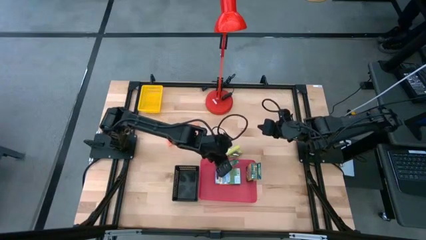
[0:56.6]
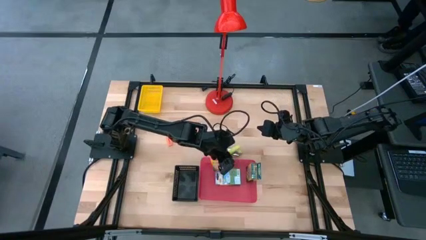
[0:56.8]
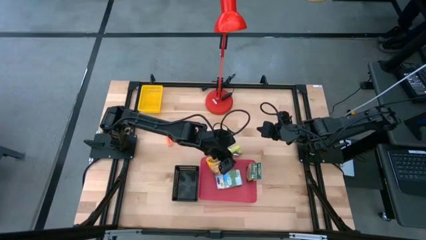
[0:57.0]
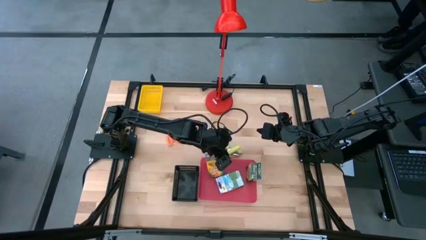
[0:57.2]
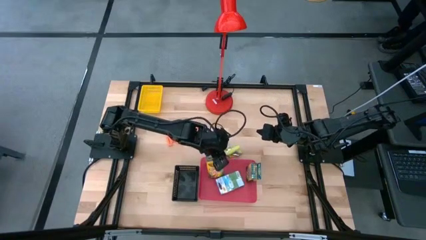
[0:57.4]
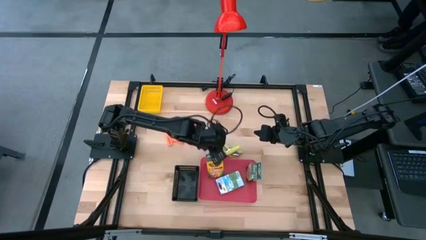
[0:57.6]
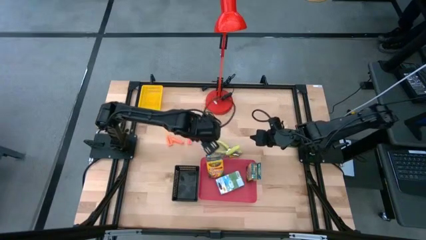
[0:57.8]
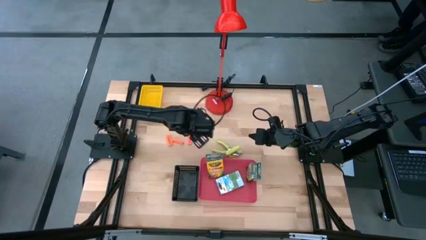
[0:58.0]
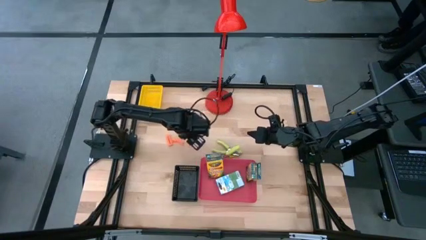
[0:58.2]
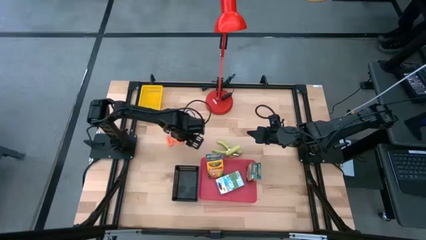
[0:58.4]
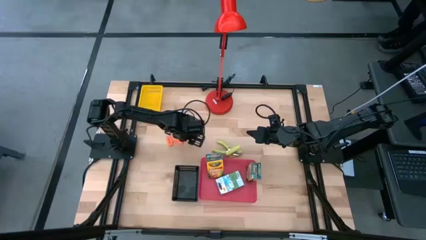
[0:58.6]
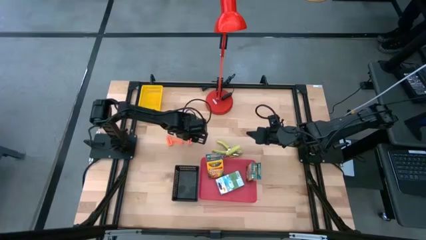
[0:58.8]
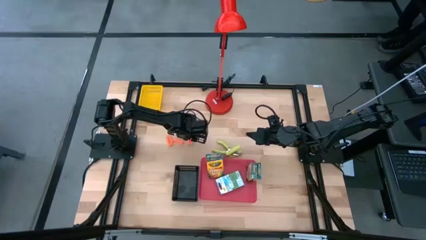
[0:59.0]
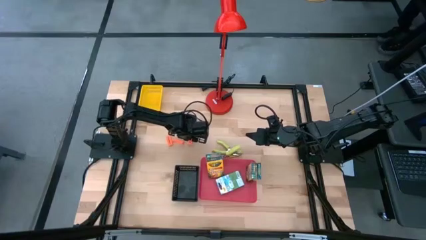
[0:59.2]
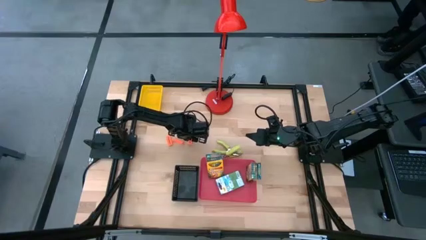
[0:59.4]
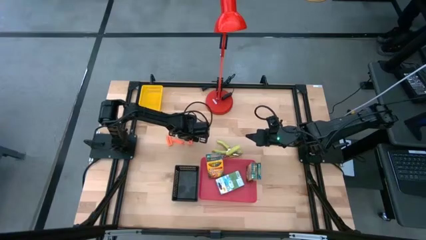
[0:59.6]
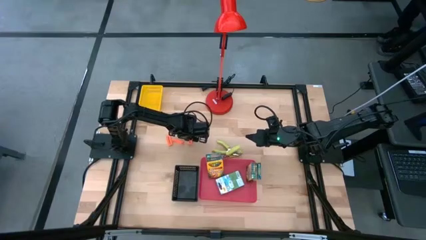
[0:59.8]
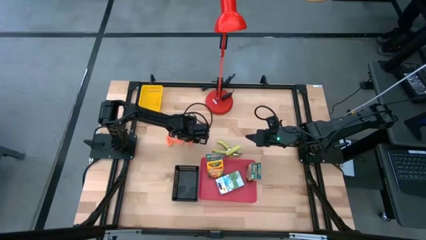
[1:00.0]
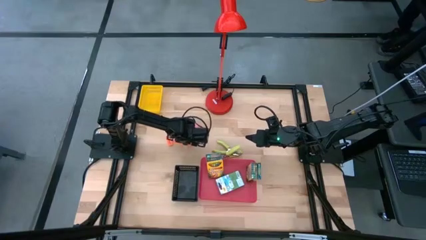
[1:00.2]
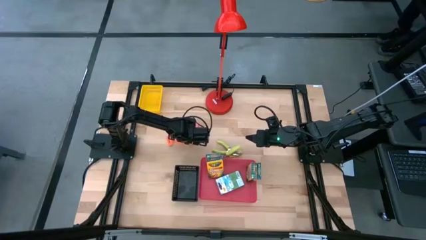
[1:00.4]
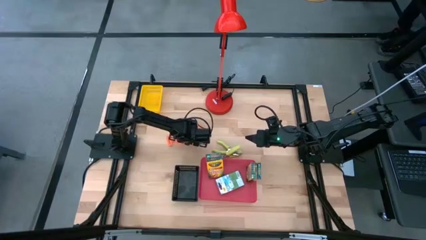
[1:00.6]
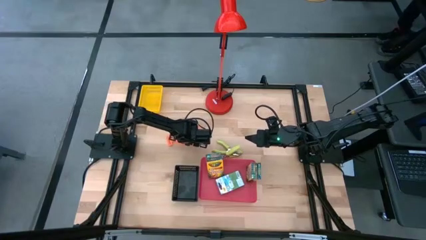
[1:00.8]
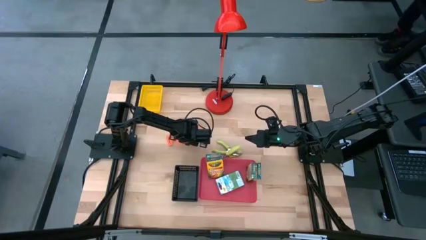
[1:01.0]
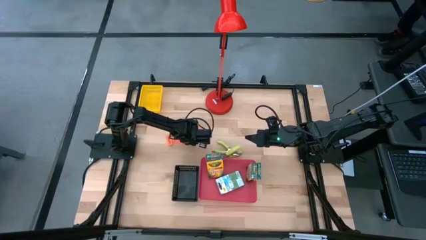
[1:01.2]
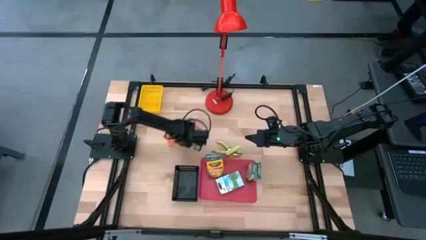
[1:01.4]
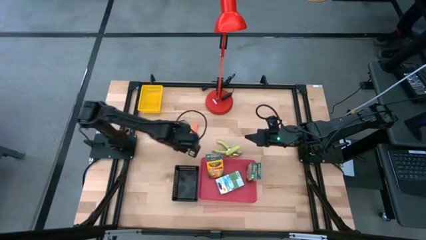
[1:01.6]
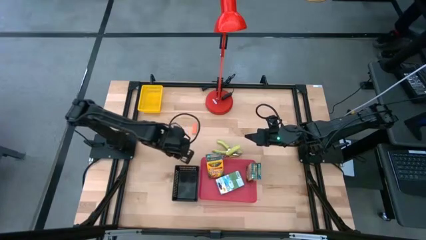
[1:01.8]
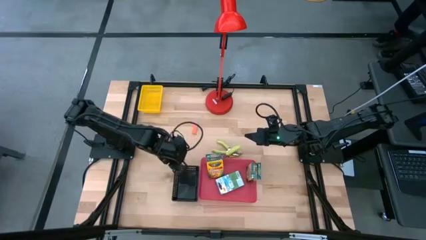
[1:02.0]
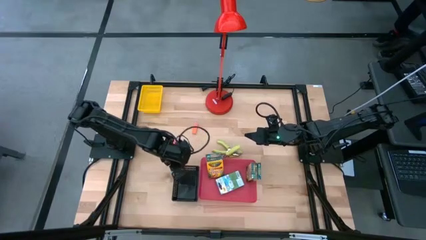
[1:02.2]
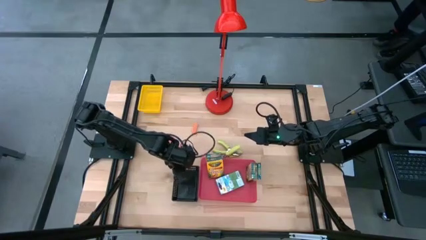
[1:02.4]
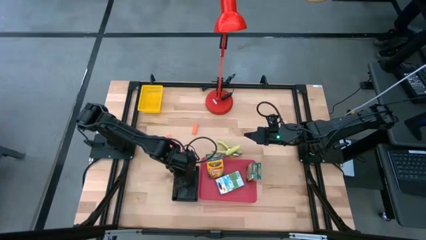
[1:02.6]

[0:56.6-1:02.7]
Task: Pick & Place School Supplies
Put the orange eraser into the black bin

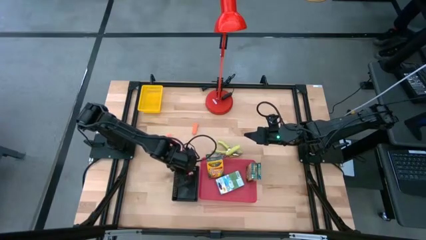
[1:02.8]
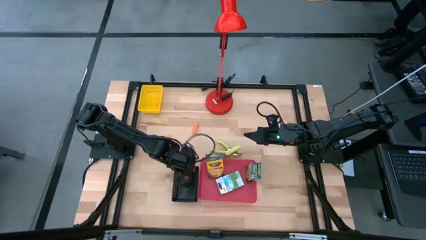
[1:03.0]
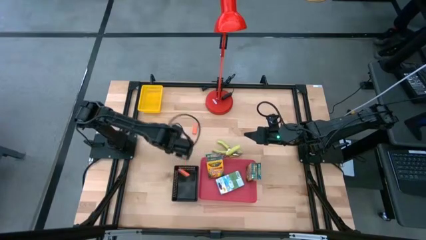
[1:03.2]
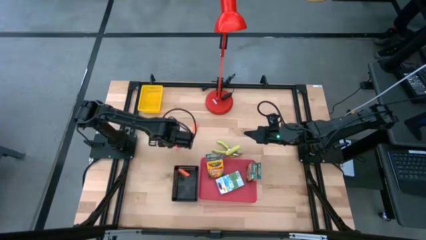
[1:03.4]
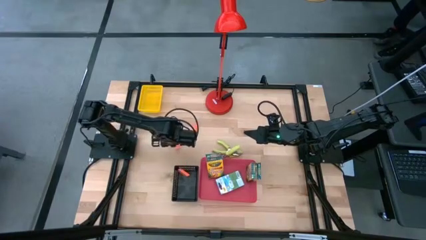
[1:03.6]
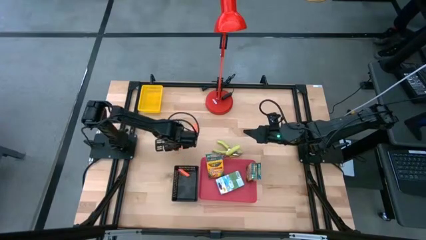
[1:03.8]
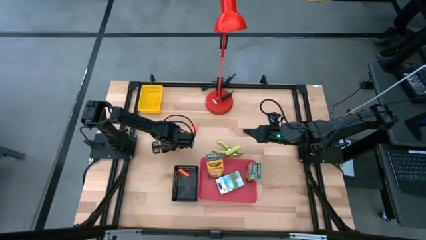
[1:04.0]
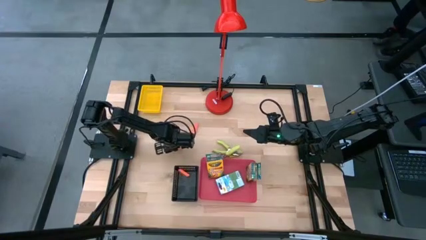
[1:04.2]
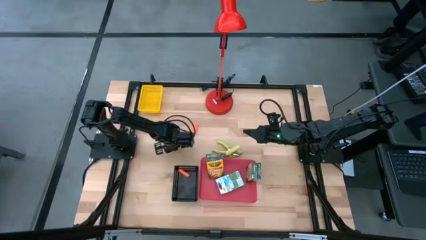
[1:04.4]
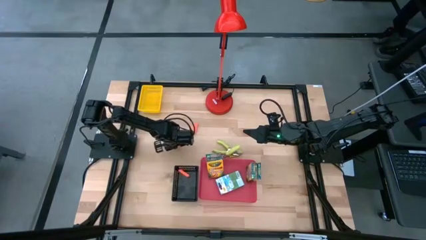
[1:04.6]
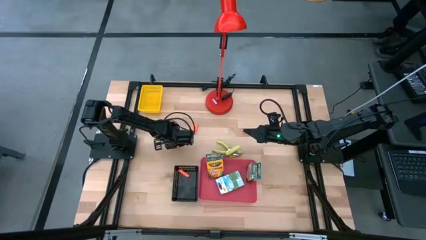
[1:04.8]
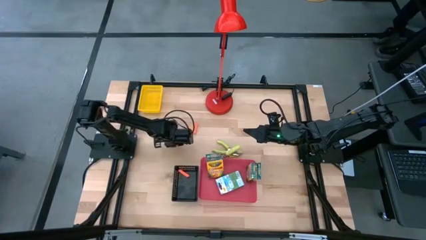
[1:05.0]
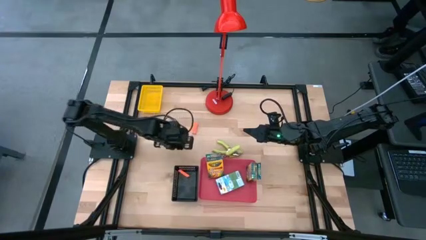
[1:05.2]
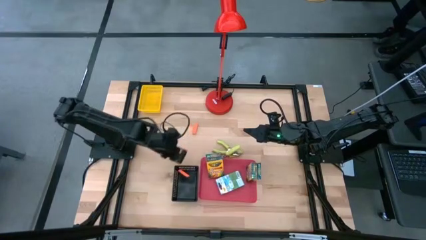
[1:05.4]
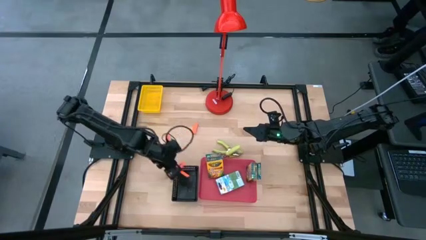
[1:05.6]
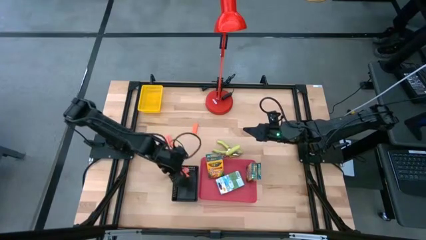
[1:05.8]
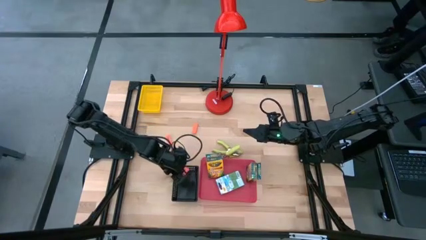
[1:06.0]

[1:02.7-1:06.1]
Put the orange eraser into the black bin

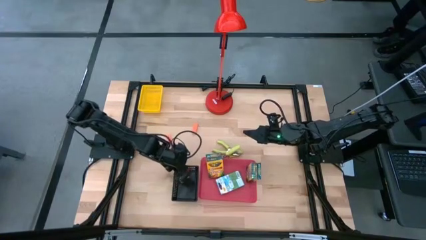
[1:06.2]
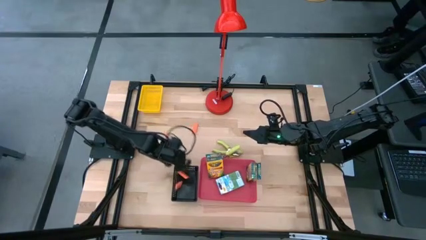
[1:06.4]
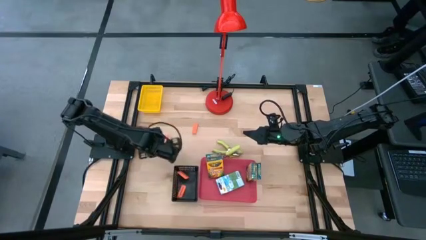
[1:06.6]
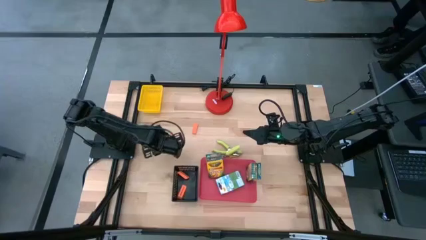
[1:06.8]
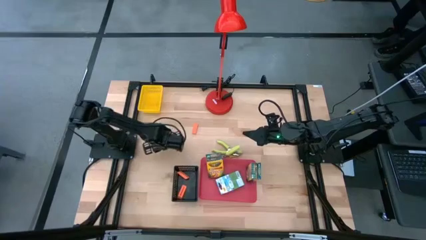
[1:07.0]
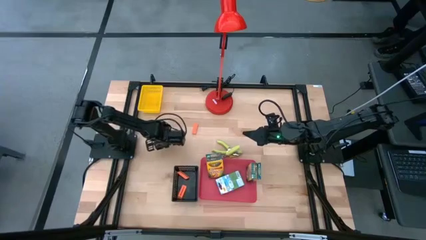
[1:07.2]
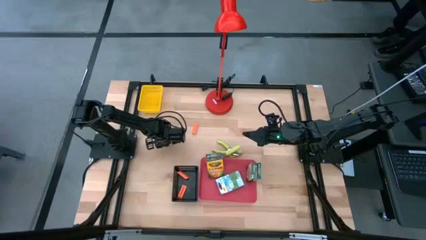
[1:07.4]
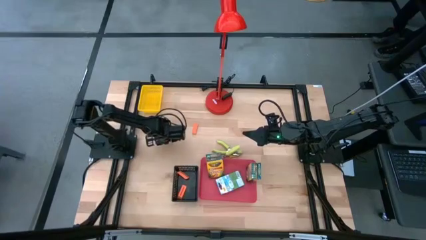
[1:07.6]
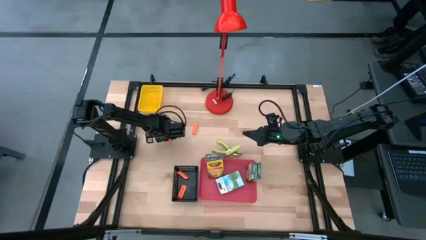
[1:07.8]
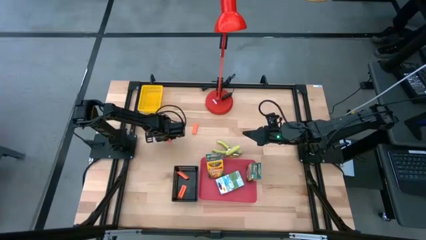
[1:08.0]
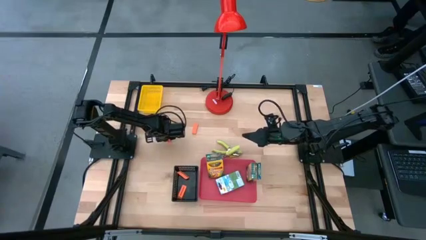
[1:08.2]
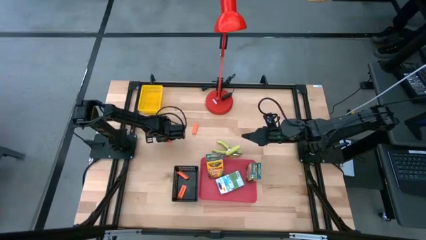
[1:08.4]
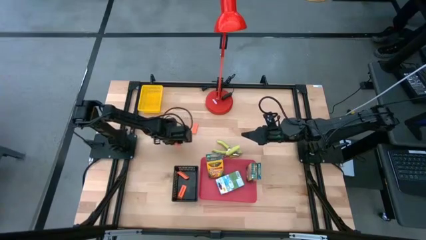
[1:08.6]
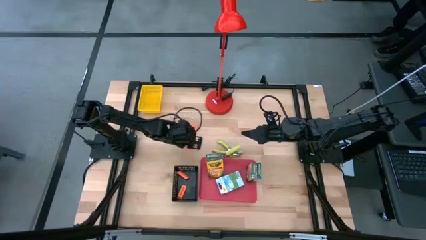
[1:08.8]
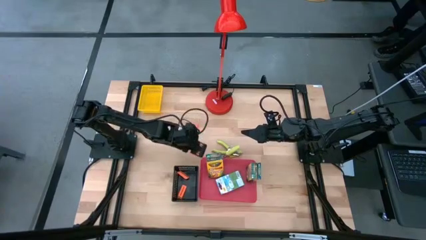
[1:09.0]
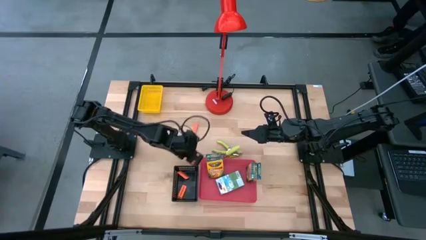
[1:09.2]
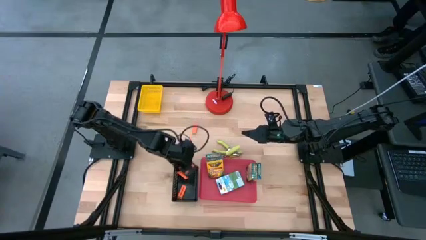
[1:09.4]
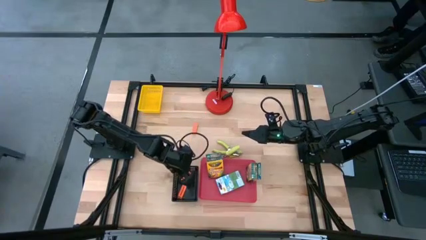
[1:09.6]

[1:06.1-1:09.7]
Put the orange eraser into the black bin

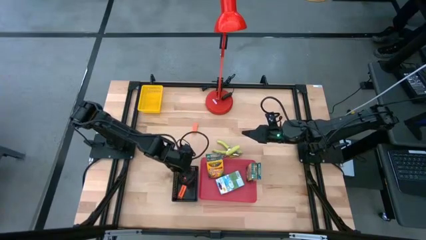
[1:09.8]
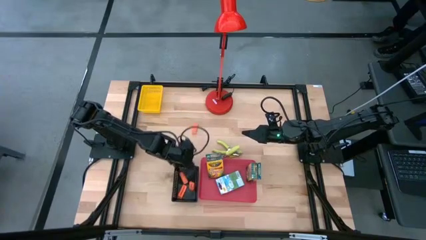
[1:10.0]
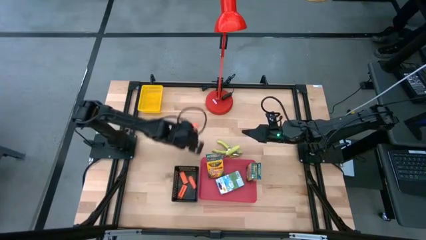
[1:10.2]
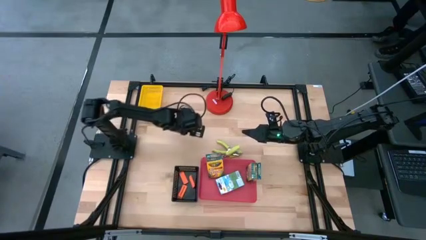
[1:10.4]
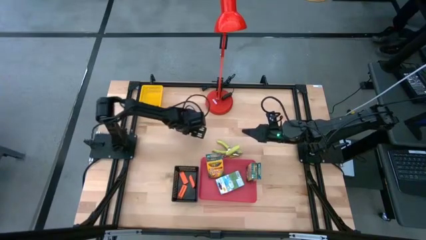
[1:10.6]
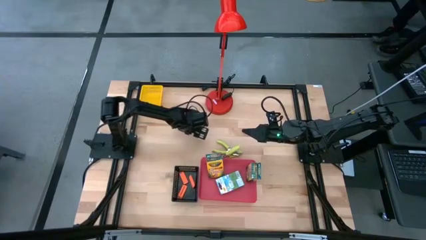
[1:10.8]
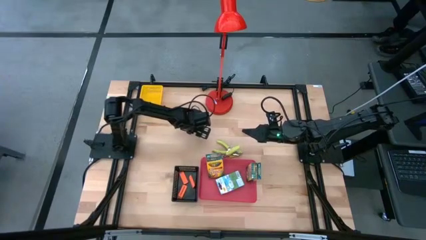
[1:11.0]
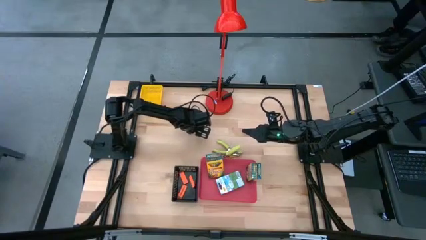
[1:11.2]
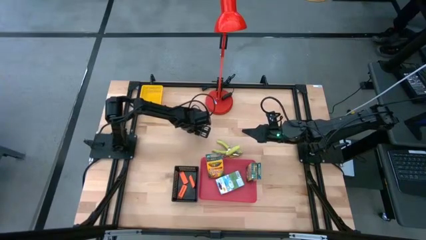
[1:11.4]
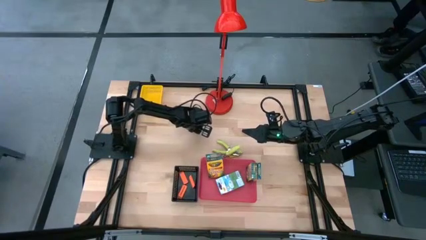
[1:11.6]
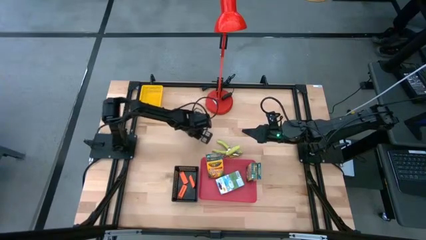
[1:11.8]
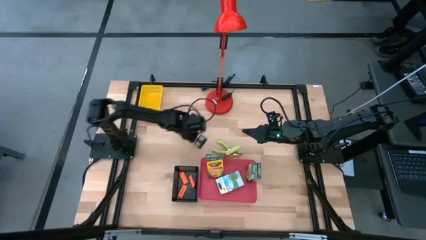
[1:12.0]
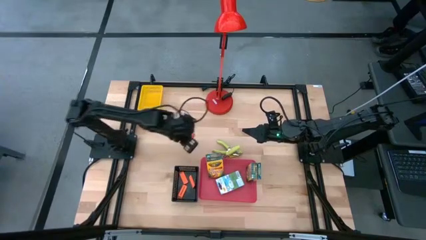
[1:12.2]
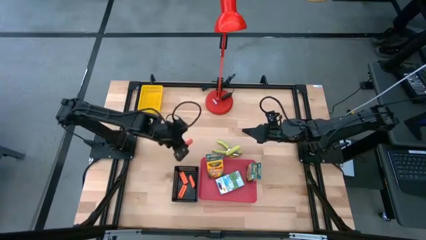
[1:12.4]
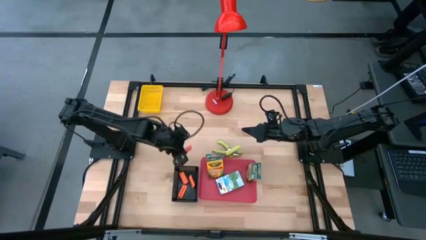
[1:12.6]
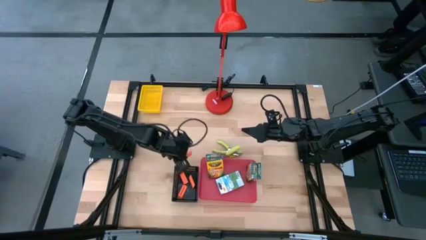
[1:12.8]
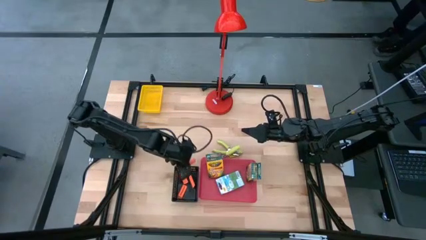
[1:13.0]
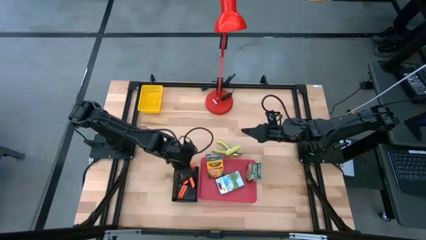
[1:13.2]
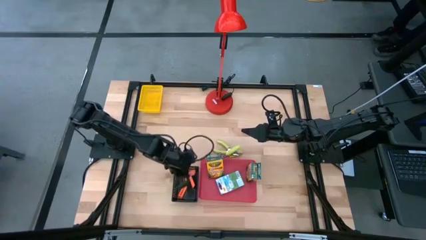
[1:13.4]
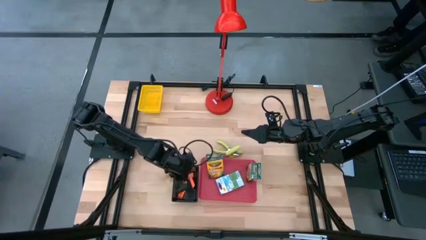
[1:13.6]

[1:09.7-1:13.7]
Put the orange eraser into the black bin
